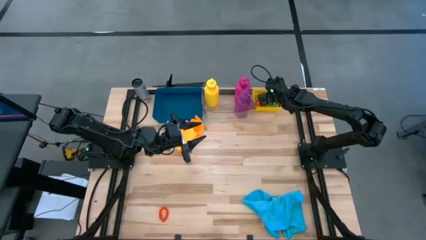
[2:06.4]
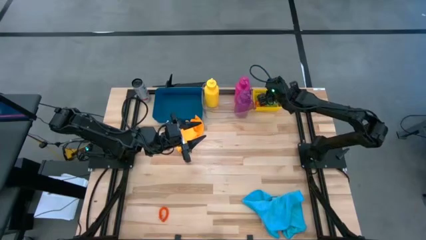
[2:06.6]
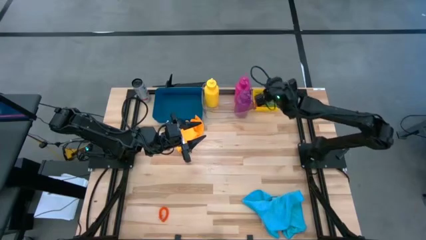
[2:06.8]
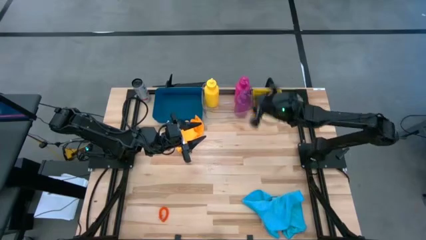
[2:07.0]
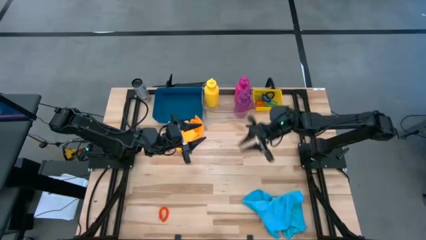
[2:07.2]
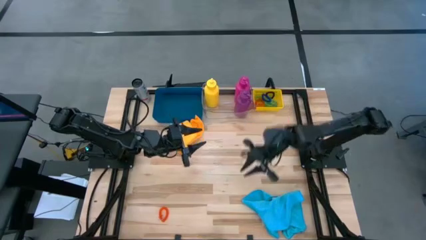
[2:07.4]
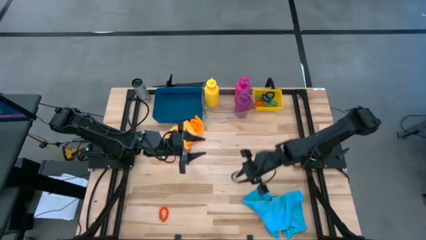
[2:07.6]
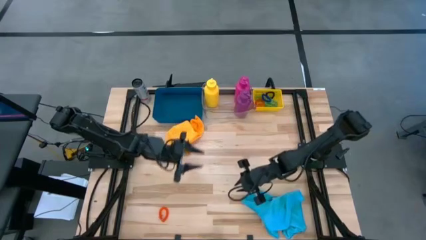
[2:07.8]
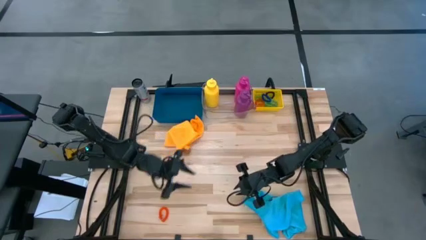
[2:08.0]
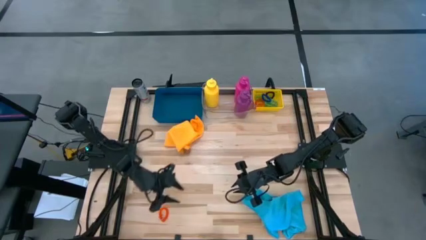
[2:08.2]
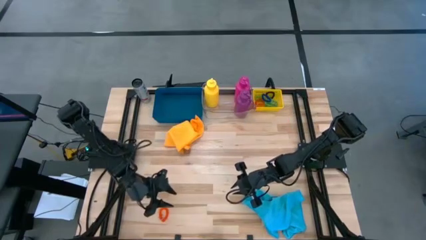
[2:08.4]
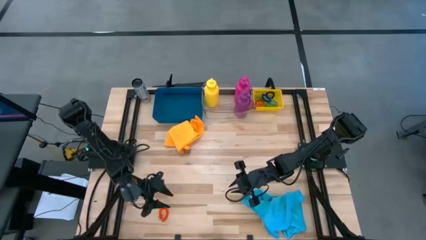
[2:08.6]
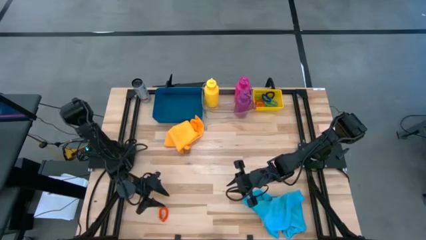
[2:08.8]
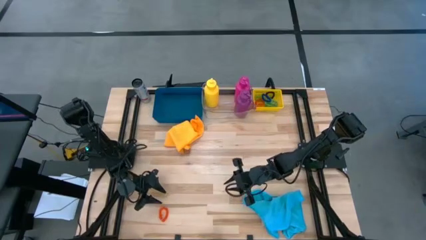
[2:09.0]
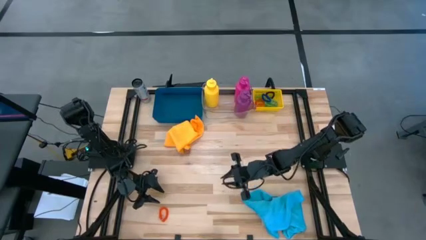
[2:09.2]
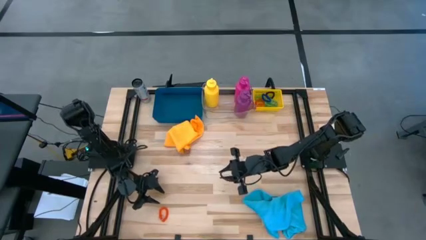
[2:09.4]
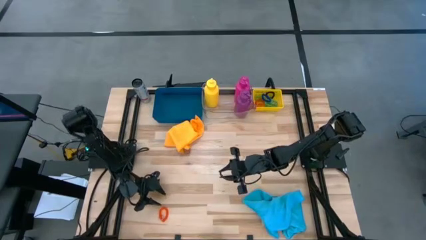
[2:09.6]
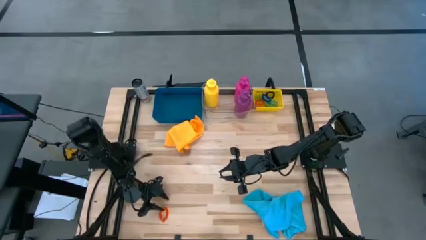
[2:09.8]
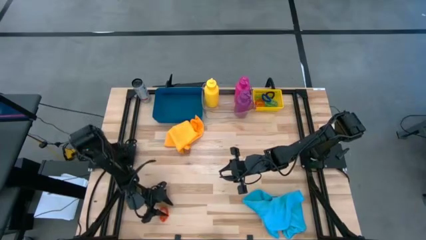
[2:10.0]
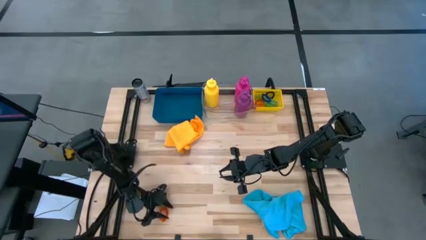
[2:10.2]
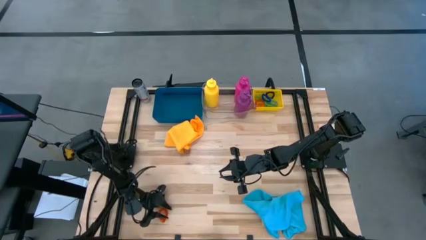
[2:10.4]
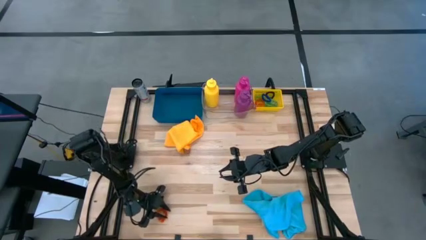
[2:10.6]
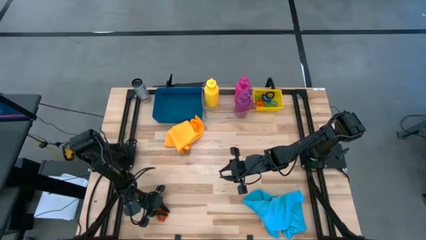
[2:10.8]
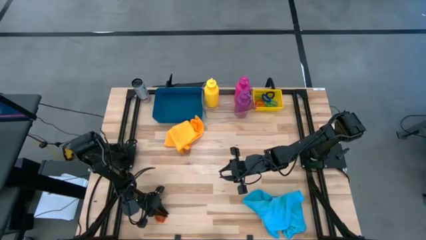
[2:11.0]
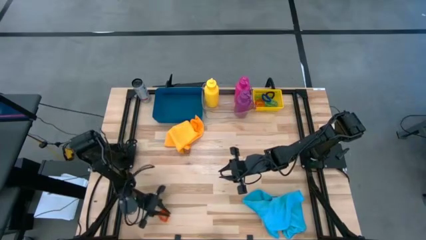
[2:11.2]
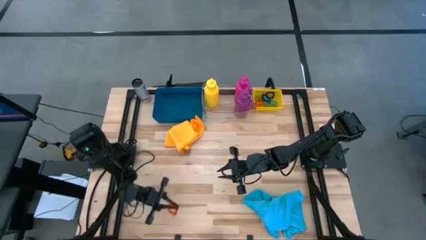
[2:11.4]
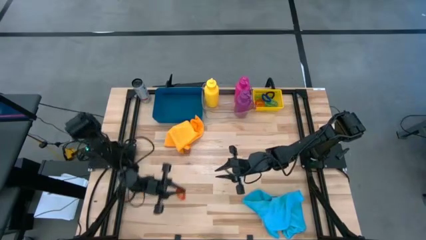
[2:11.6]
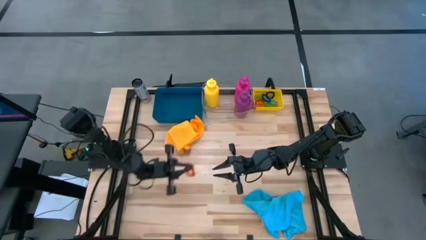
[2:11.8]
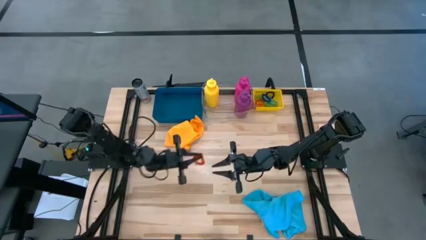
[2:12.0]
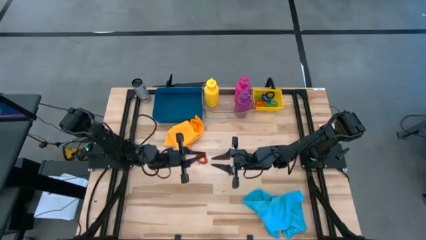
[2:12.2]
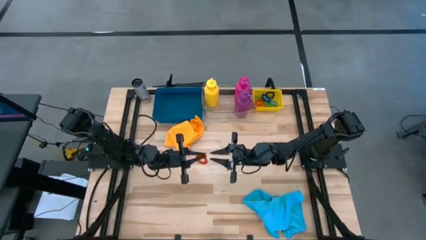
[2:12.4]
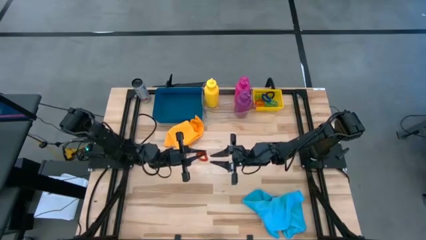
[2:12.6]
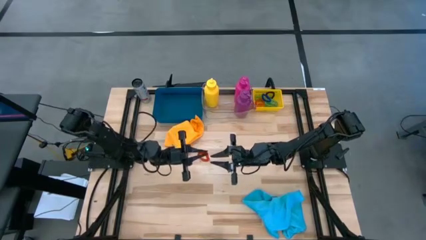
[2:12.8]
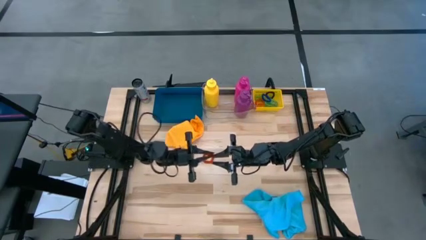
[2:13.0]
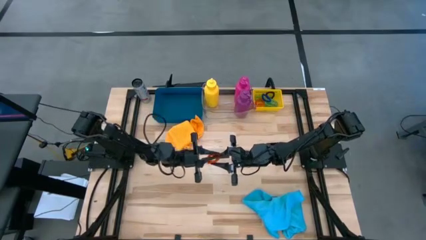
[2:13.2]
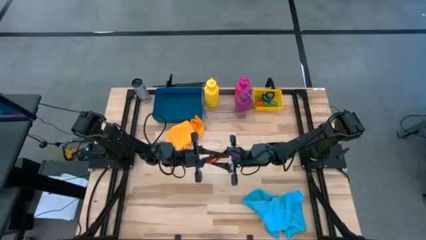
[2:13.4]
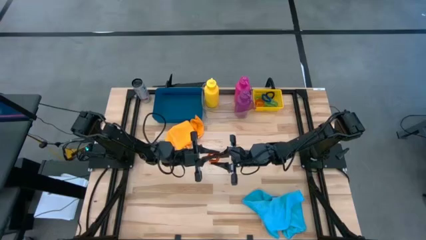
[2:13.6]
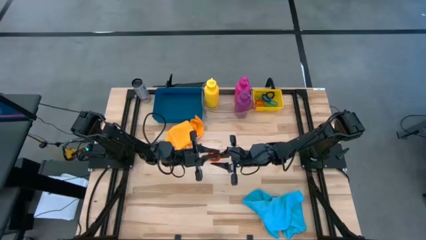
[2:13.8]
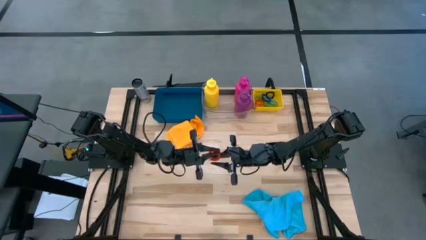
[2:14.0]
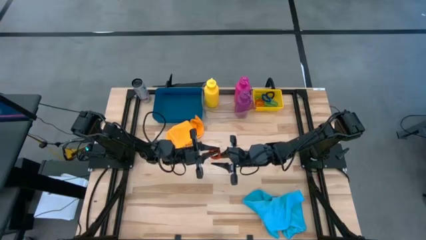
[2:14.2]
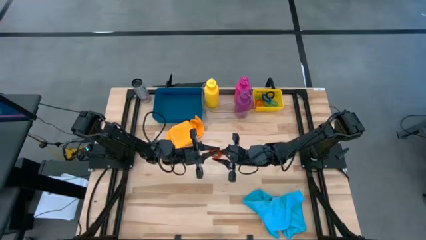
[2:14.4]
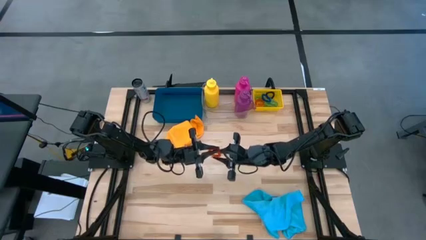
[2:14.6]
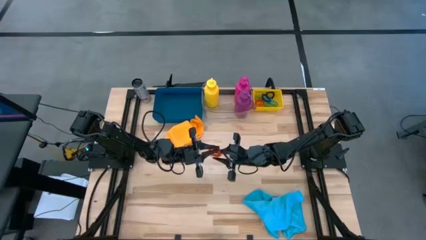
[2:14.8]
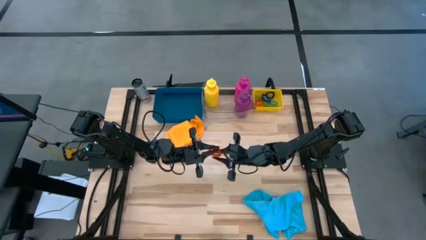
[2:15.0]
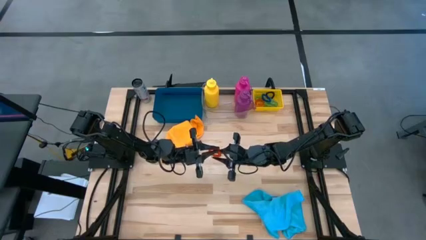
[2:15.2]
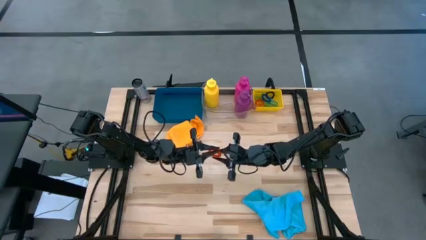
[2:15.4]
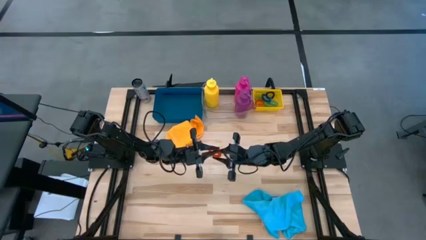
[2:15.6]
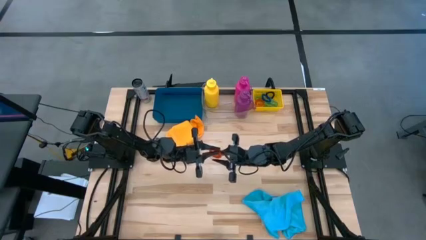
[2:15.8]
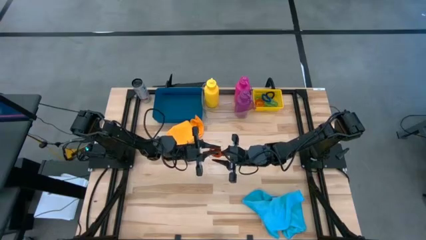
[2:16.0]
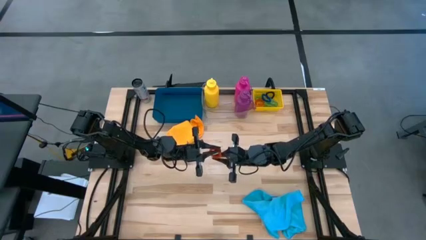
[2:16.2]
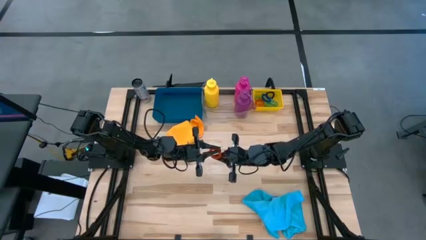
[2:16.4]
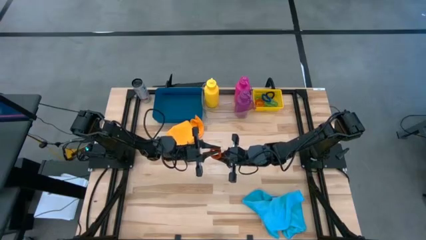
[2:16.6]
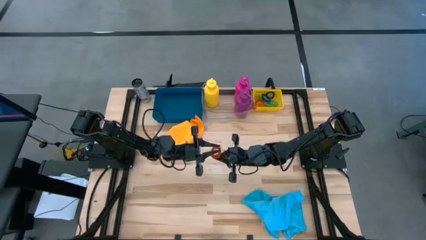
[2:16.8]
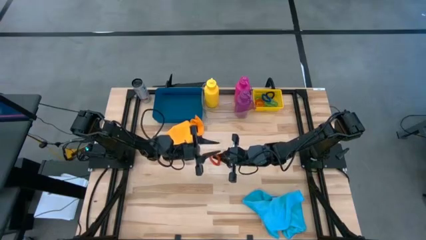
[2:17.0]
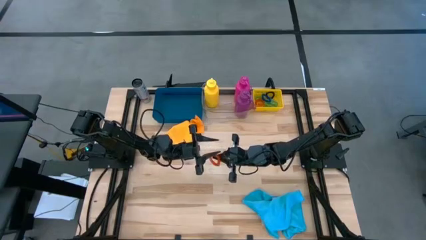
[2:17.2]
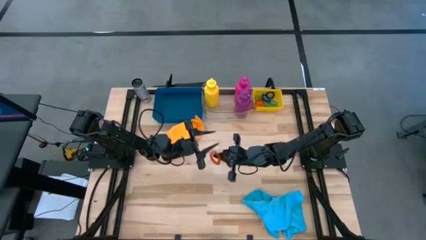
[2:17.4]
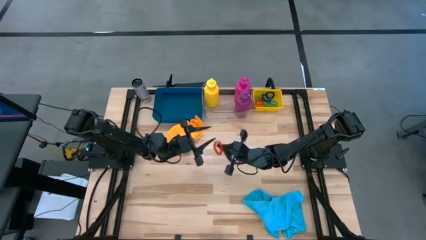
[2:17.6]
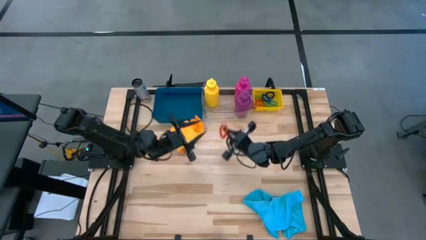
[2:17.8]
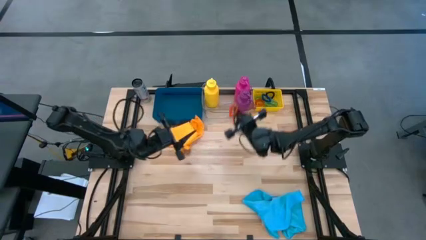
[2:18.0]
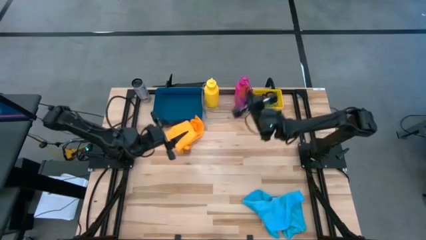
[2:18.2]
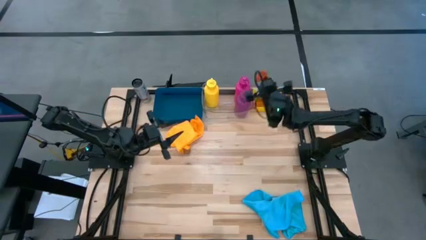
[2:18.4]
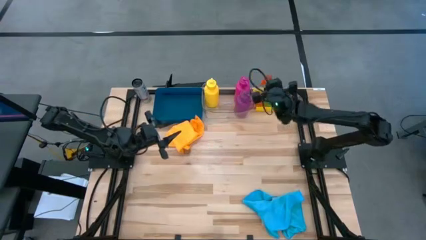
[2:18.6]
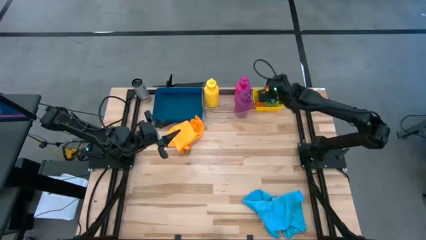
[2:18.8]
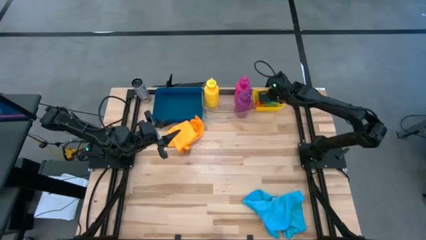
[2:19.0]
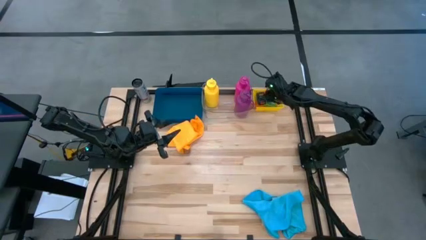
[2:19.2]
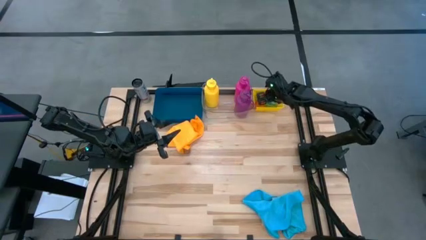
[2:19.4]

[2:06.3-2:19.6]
Task: Pick & Place Sports Items
Put the orange spring keychain into the yellow bin
